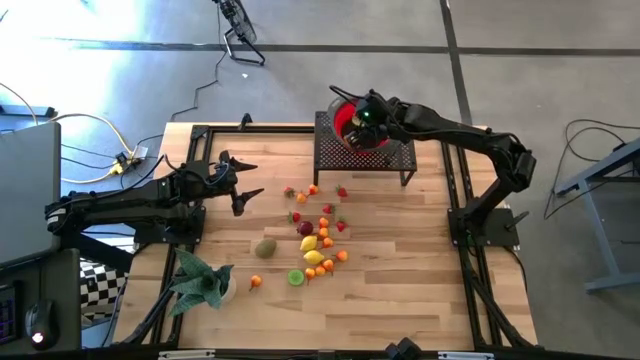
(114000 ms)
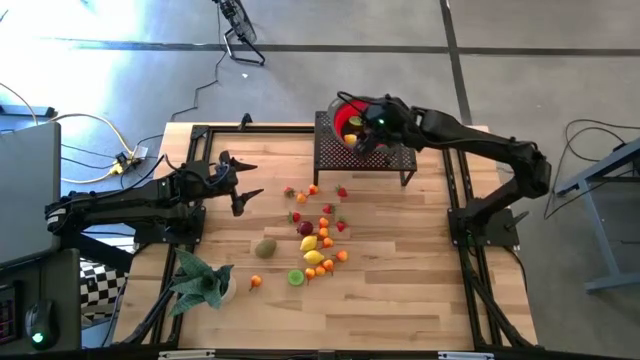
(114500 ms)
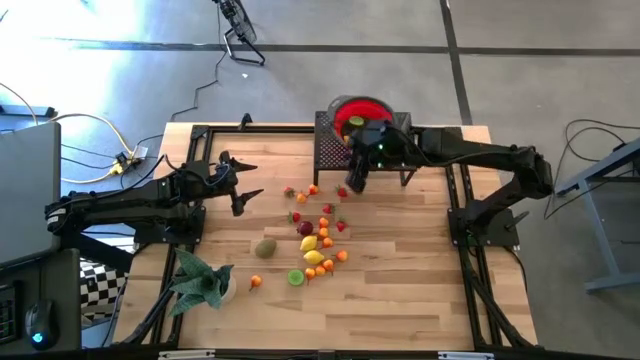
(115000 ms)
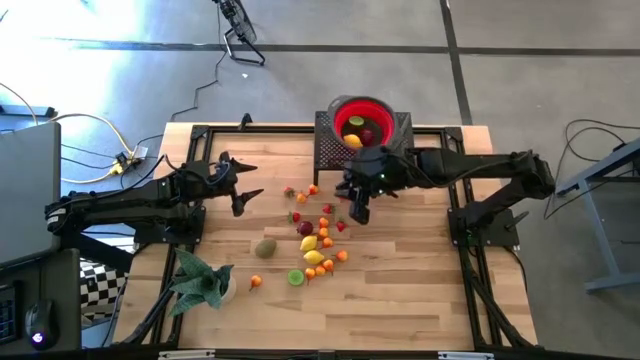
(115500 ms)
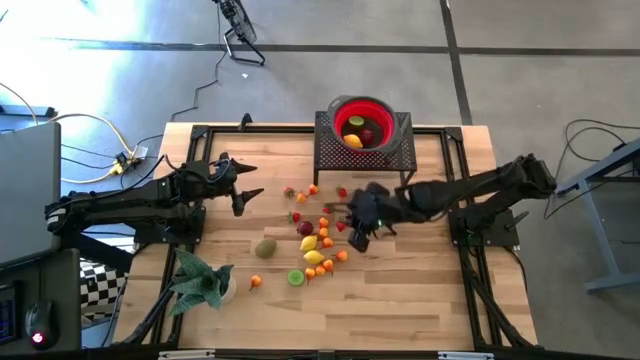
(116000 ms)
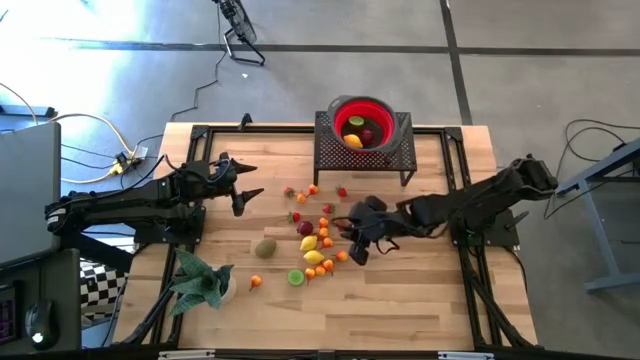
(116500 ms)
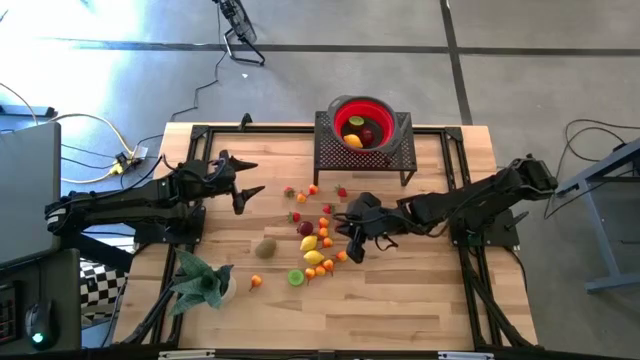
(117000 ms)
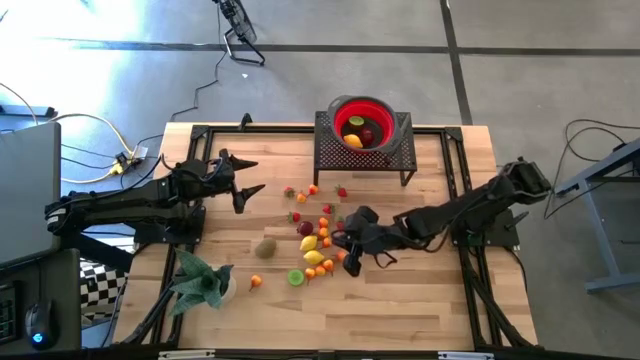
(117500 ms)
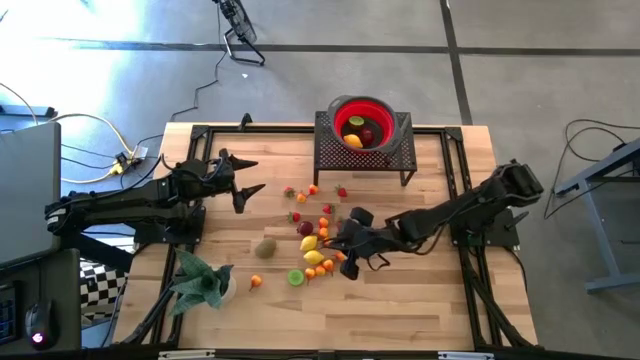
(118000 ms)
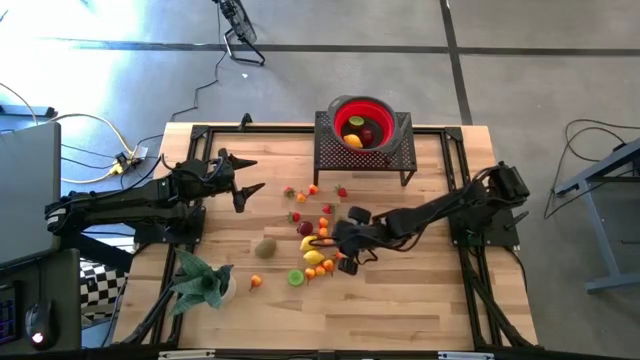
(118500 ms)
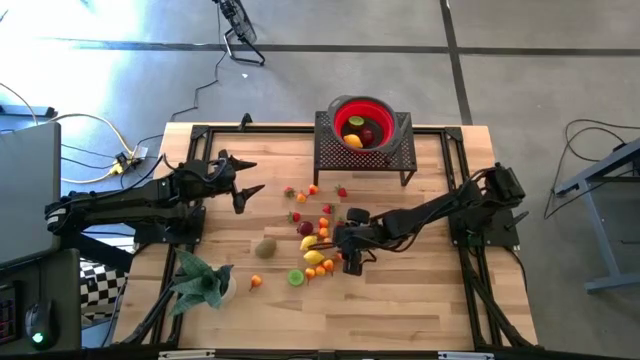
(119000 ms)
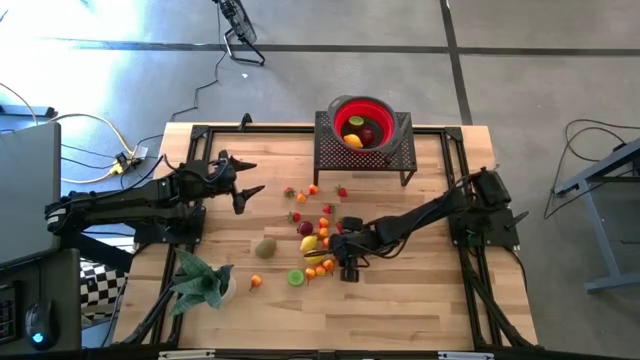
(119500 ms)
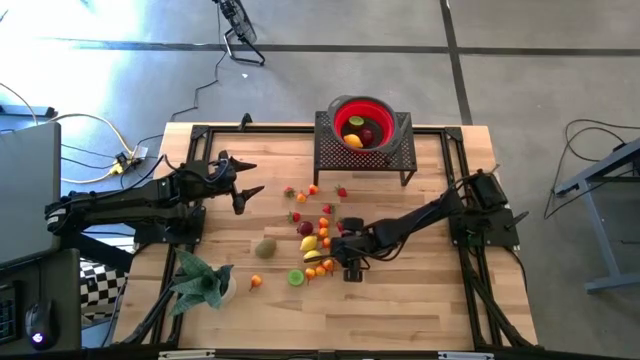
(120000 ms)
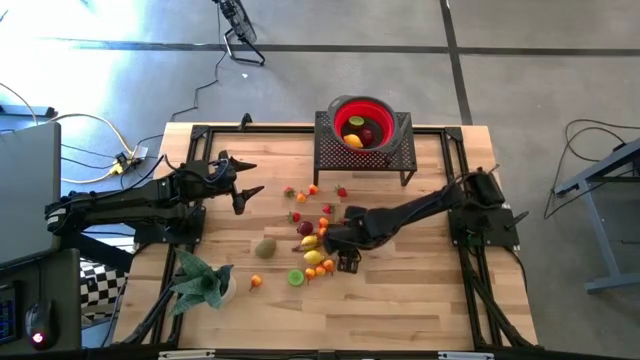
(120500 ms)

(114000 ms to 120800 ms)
Task: Pick & Place Fruit
Put the pear into the strainer on the shelf

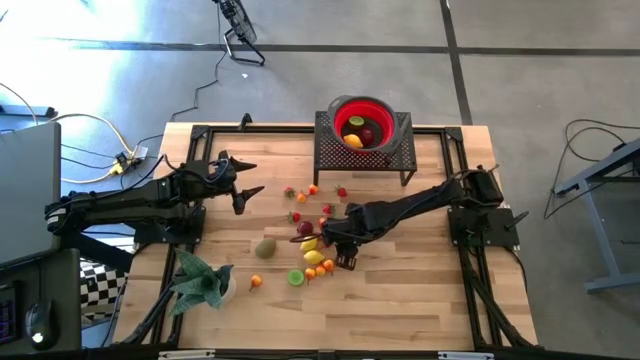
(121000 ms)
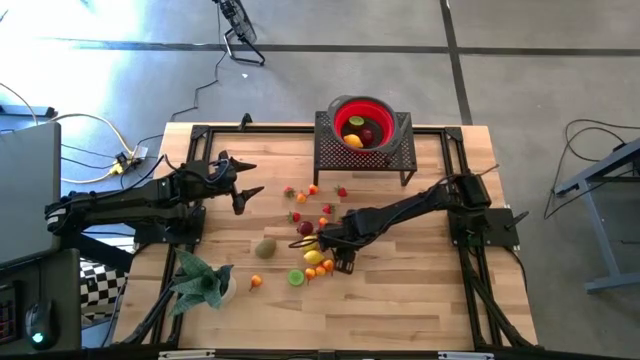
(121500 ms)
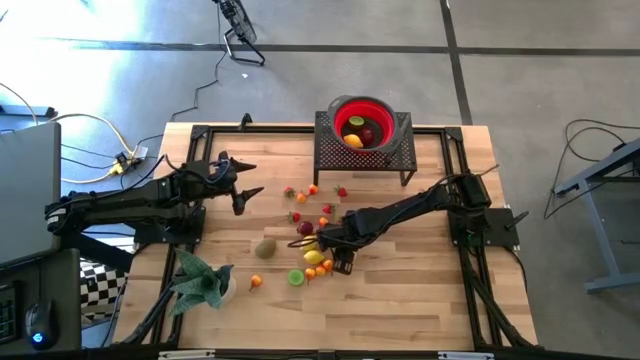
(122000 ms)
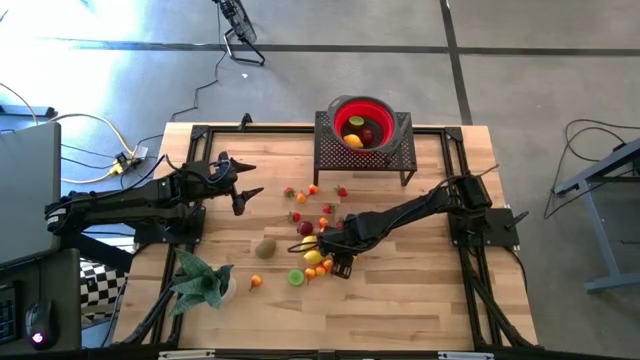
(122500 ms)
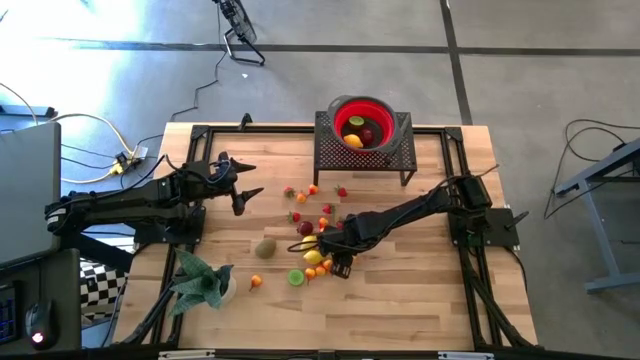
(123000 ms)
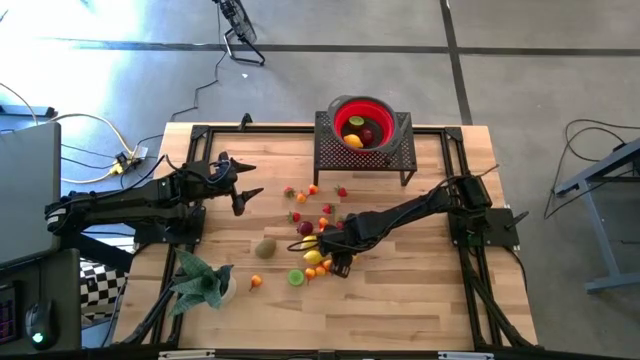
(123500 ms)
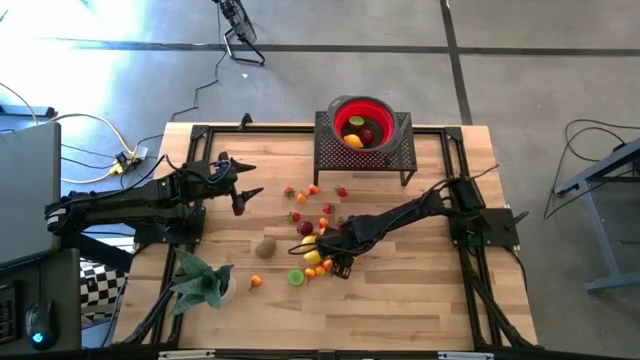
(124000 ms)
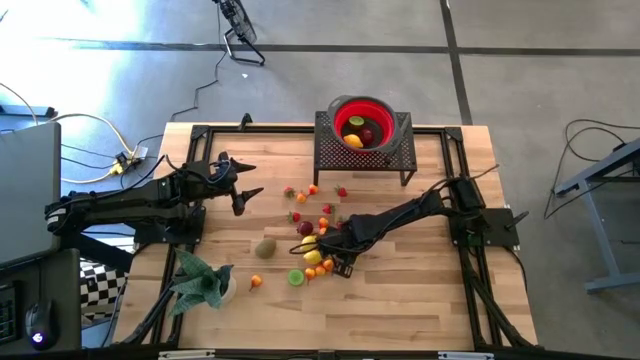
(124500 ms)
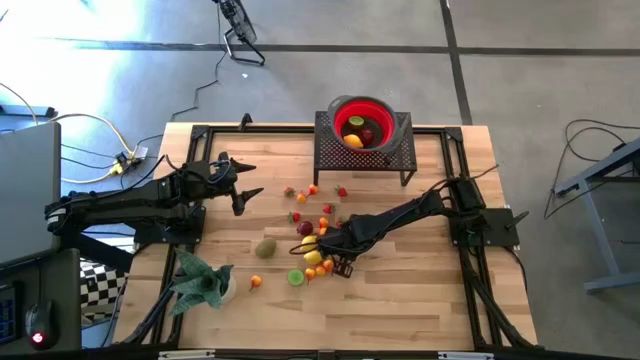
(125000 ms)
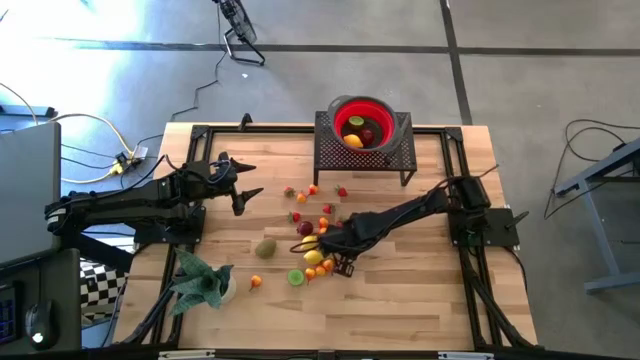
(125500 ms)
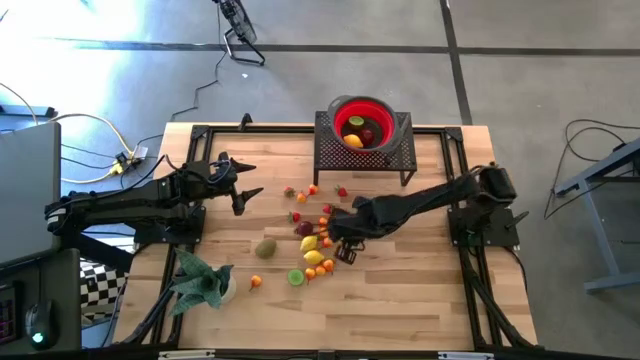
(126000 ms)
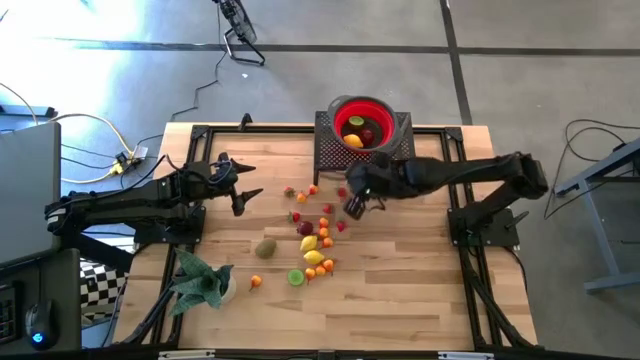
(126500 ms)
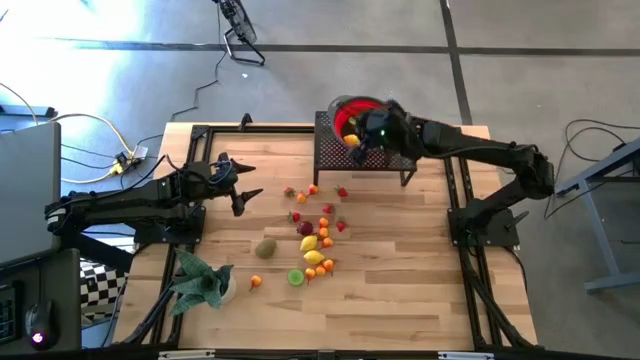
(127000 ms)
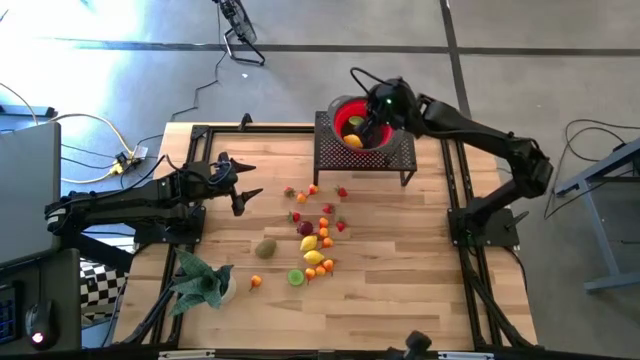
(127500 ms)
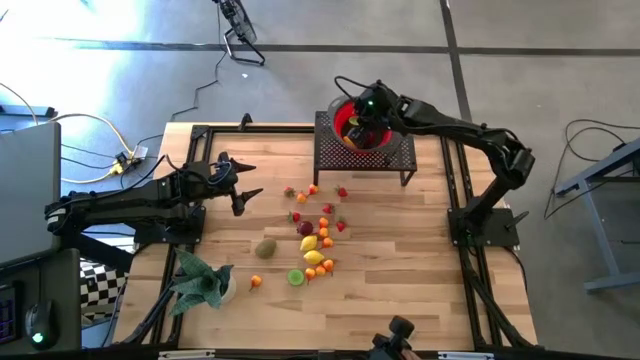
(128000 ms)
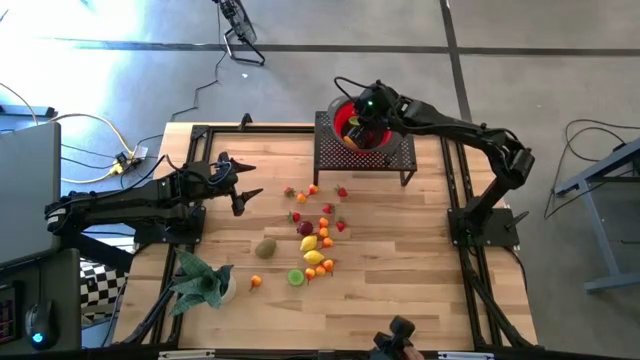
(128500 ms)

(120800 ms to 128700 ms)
Put the pear into the strainer on the shelf

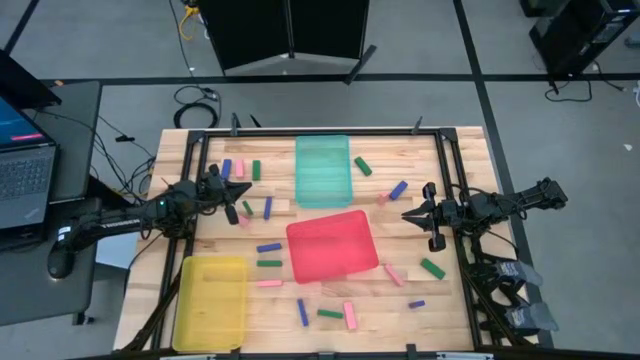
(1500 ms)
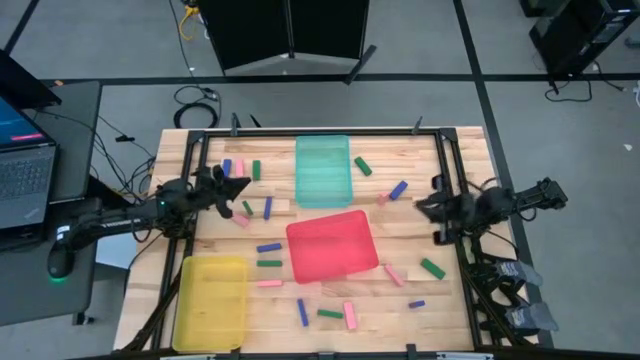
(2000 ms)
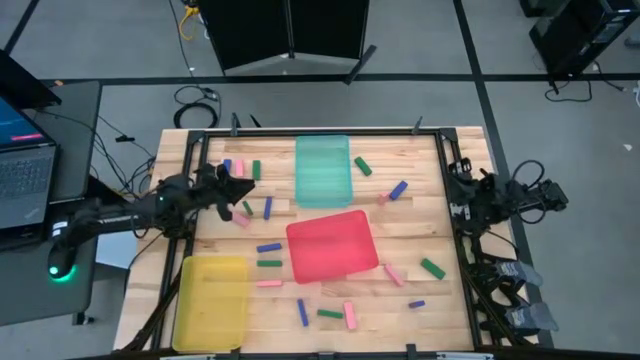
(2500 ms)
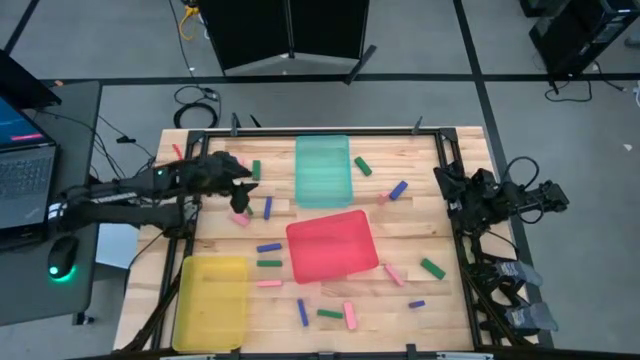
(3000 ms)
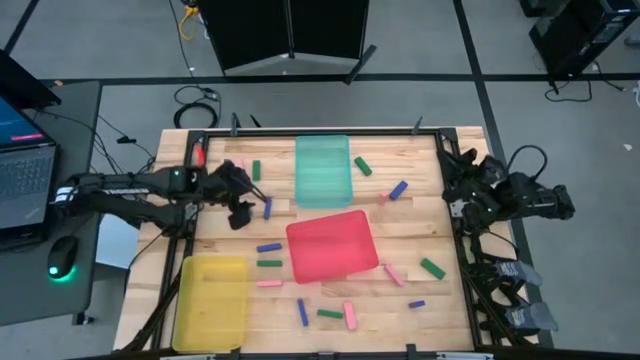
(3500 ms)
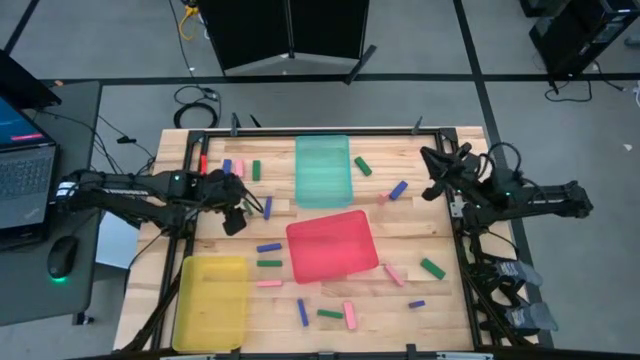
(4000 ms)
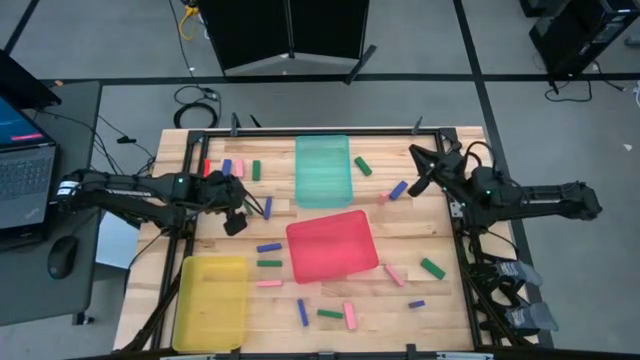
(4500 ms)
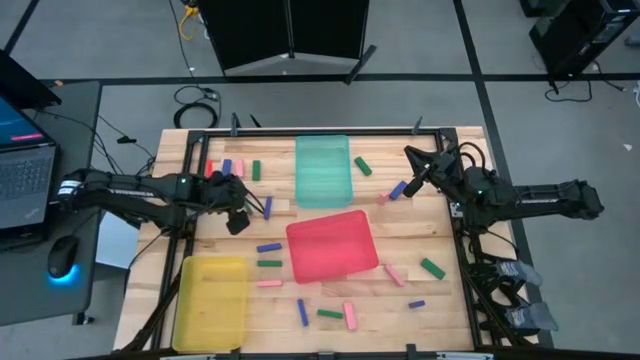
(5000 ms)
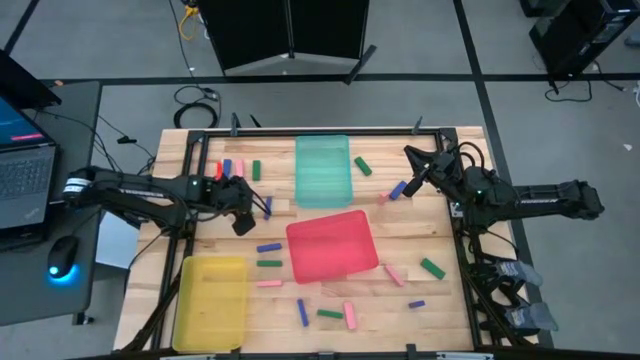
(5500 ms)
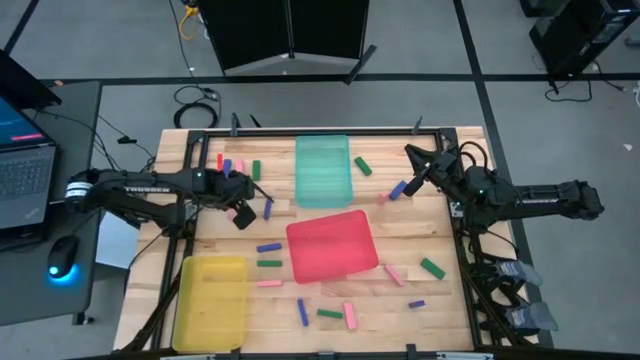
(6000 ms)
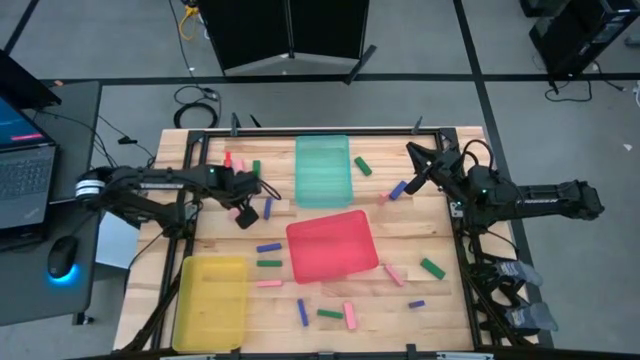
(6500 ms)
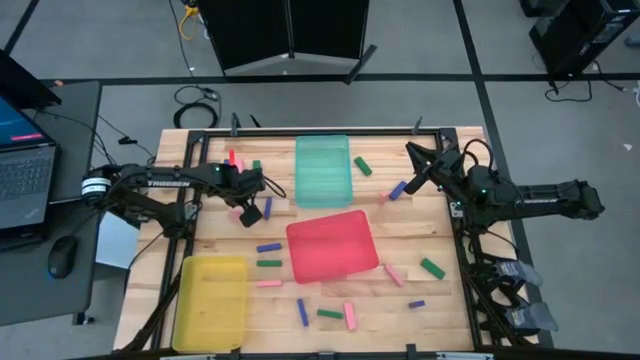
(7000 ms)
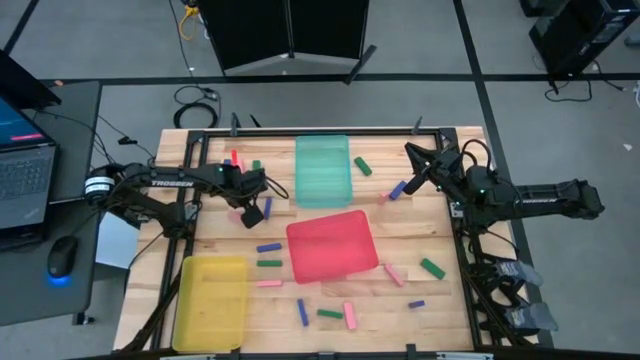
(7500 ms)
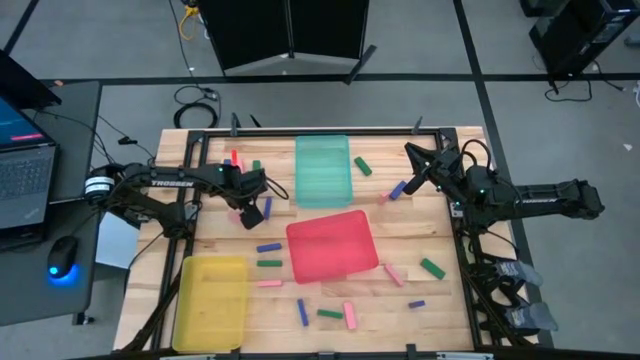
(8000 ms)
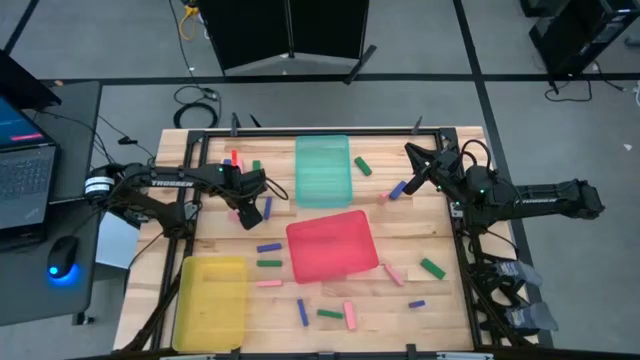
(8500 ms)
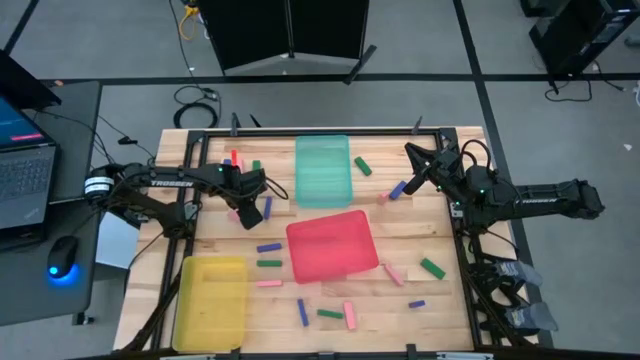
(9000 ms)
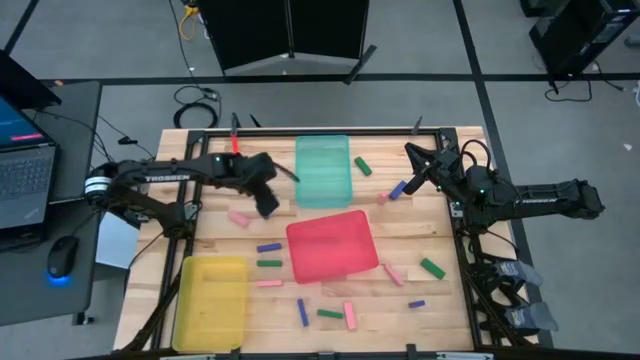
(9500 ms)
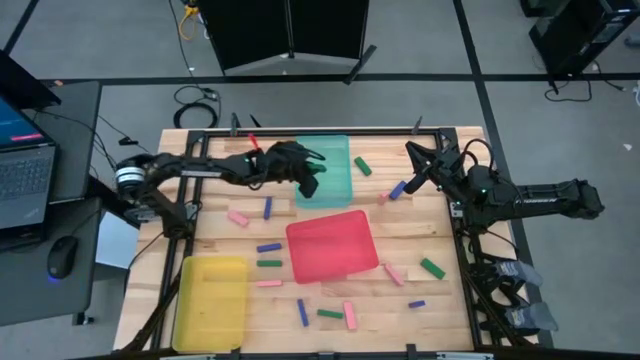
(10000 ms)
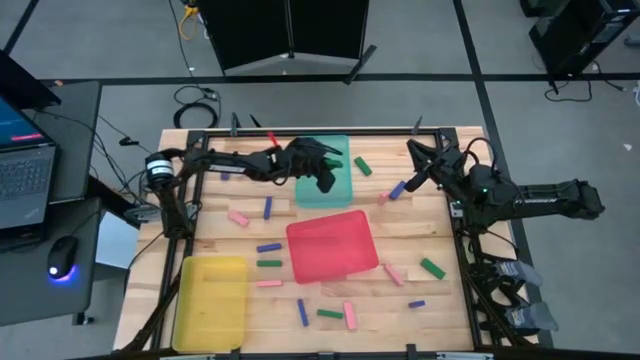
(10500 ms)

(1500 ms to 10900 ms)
Task: Sort blocks
Put the green block into the green bin
